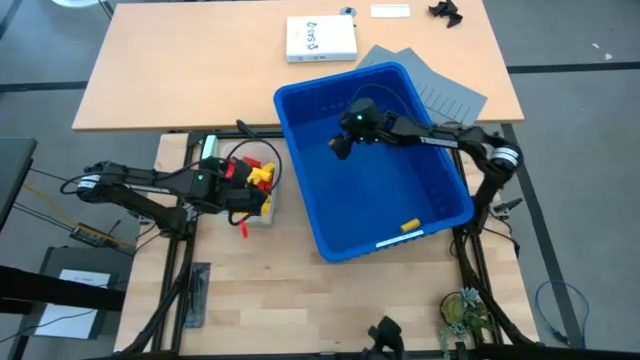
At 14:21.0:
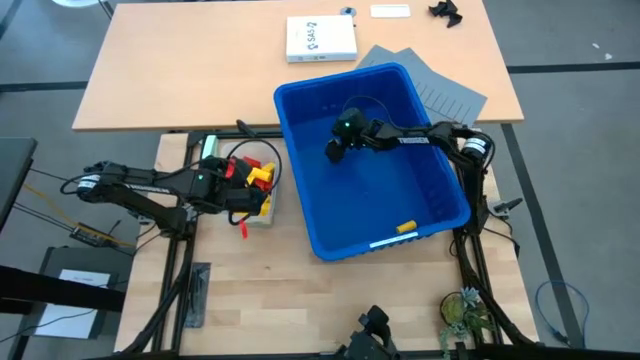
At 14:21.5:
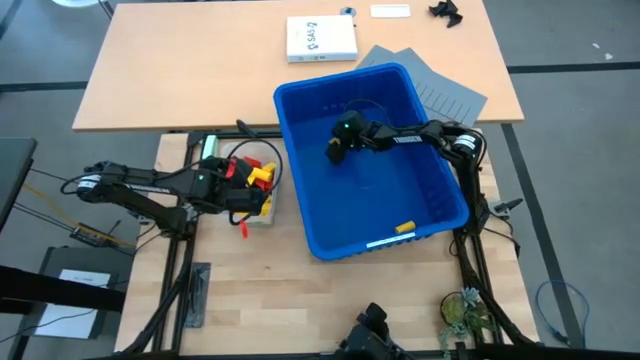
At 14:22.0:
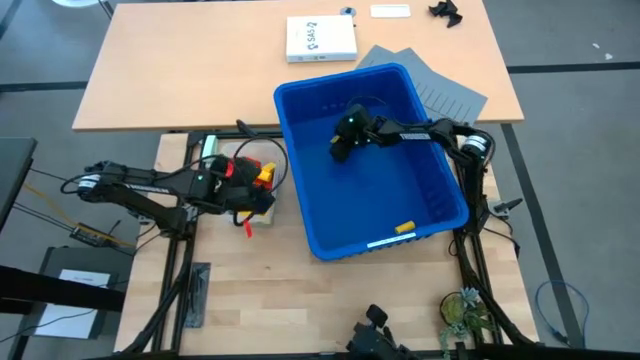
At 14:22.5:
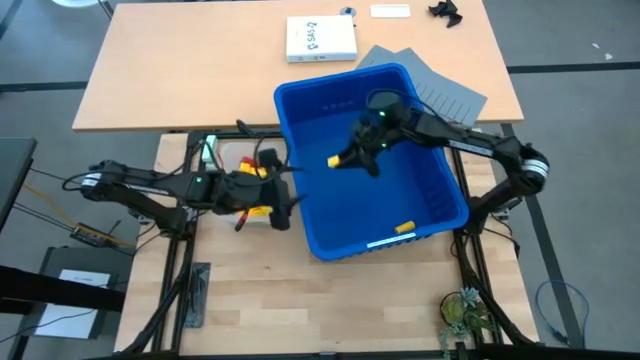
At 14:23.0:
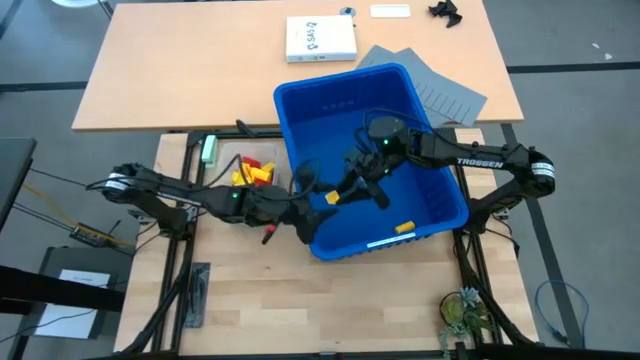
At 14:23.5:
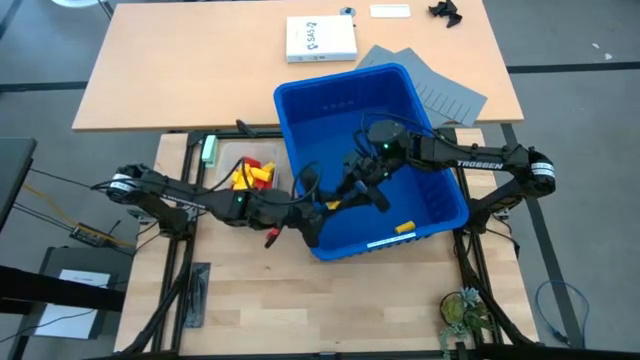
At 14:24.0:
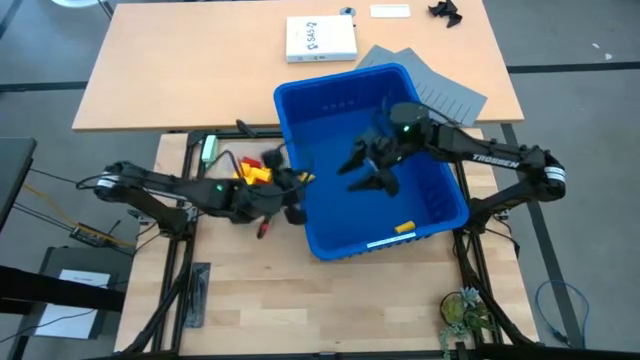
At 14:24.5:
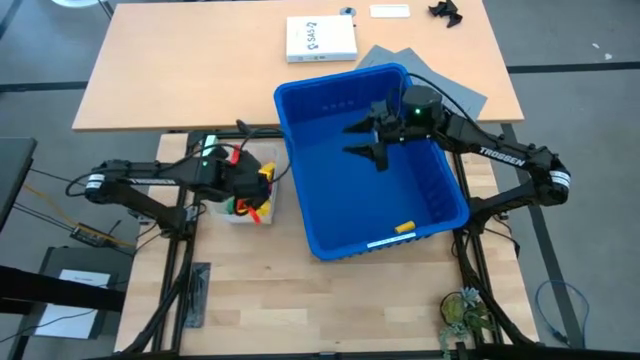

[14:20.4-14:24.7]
Task: Sort blocks
Put the yellow block into the transparent bin

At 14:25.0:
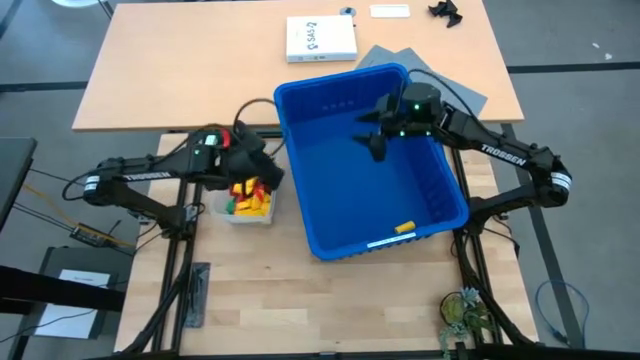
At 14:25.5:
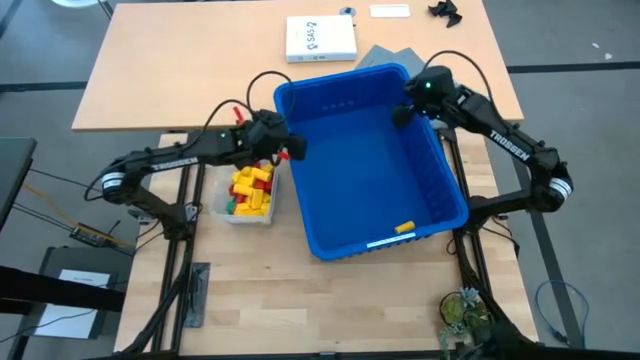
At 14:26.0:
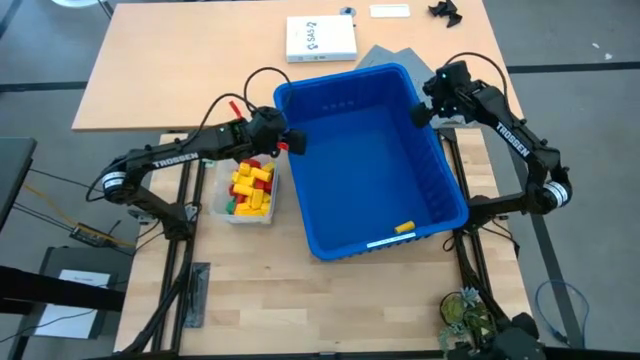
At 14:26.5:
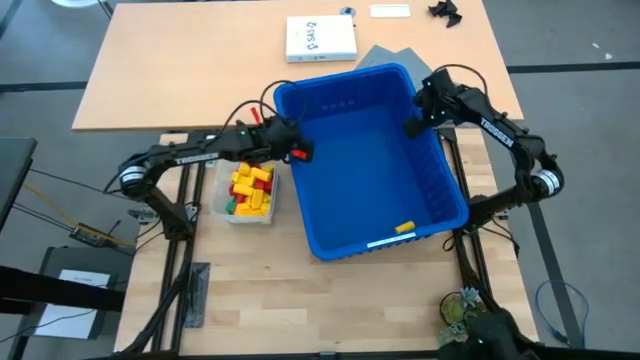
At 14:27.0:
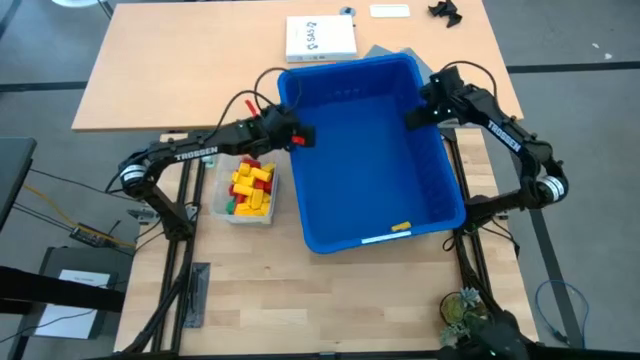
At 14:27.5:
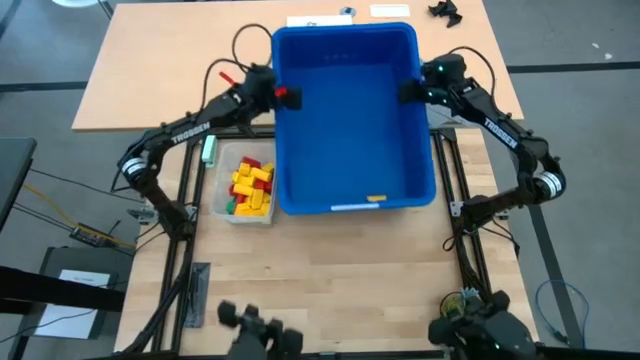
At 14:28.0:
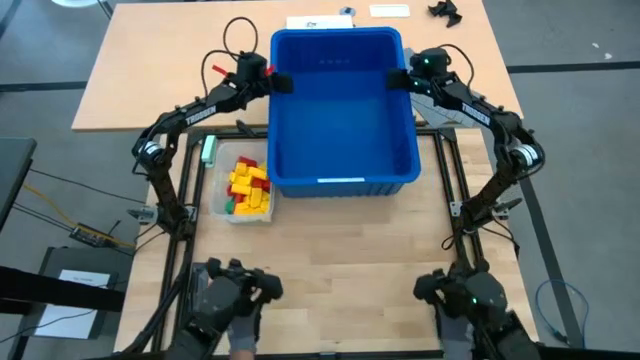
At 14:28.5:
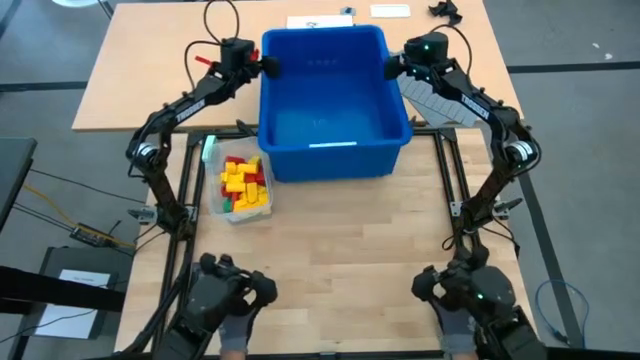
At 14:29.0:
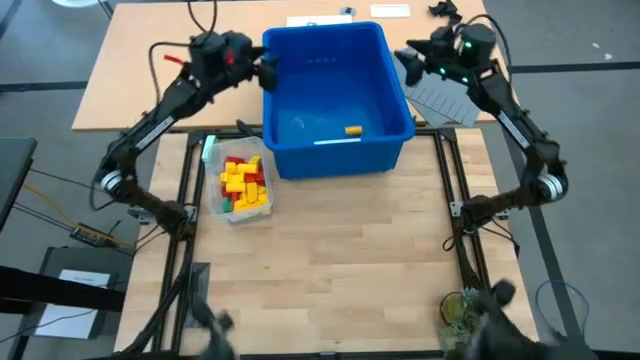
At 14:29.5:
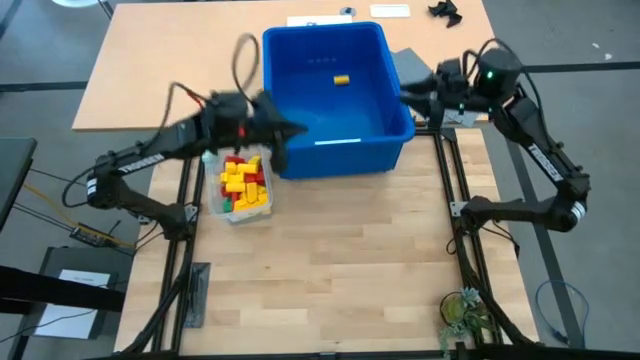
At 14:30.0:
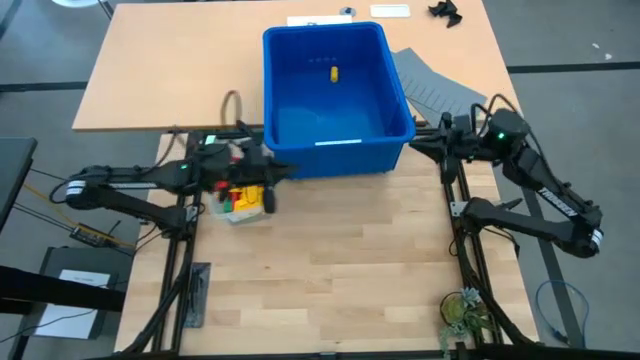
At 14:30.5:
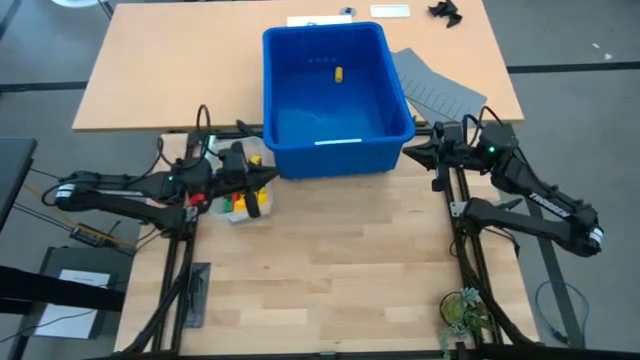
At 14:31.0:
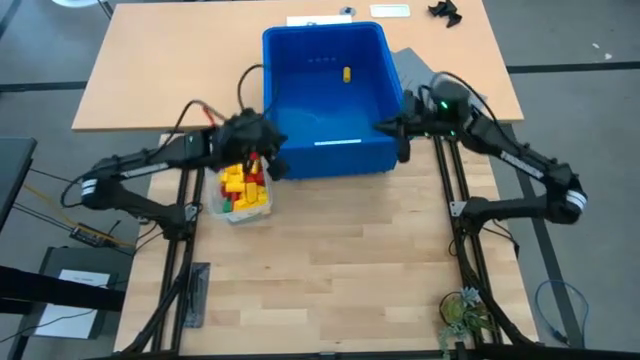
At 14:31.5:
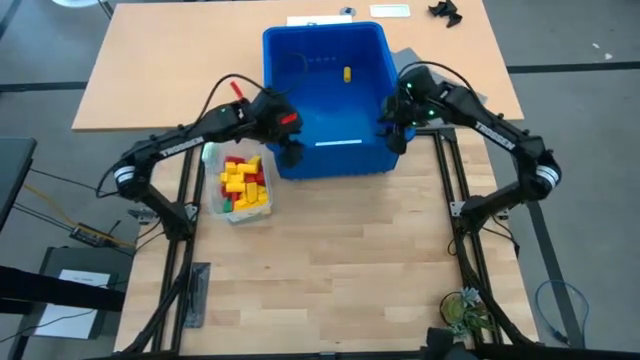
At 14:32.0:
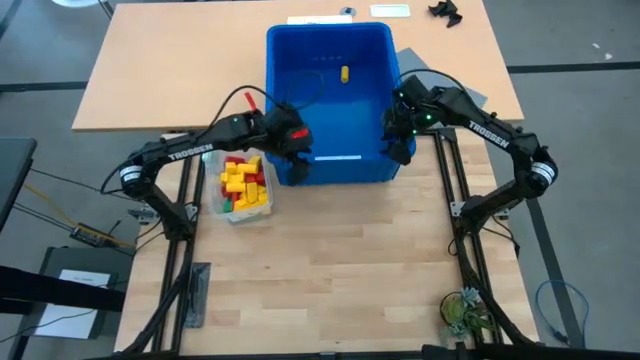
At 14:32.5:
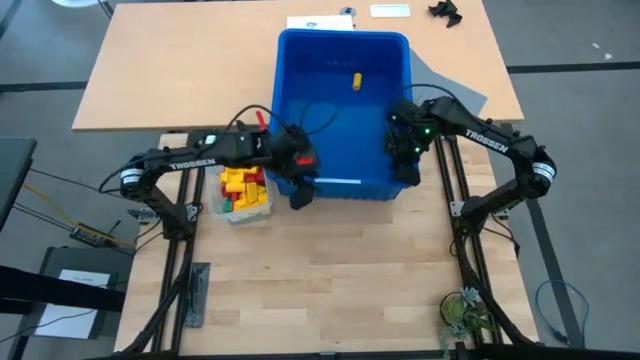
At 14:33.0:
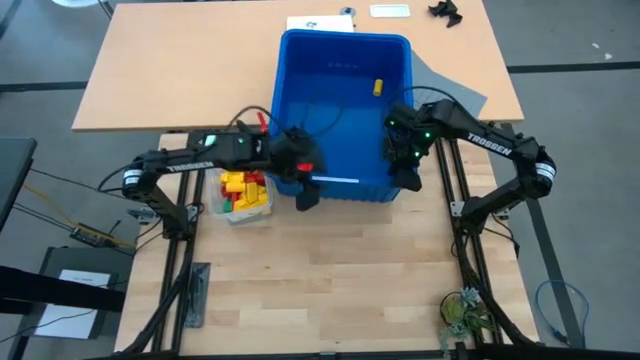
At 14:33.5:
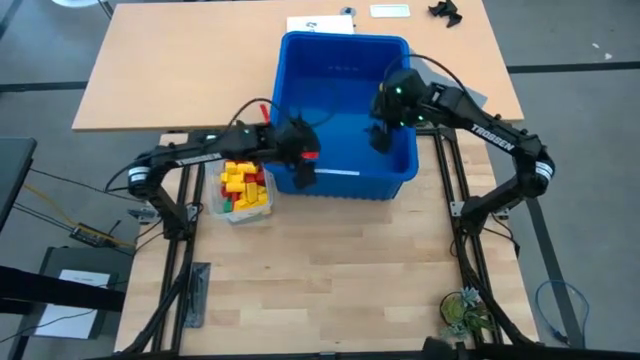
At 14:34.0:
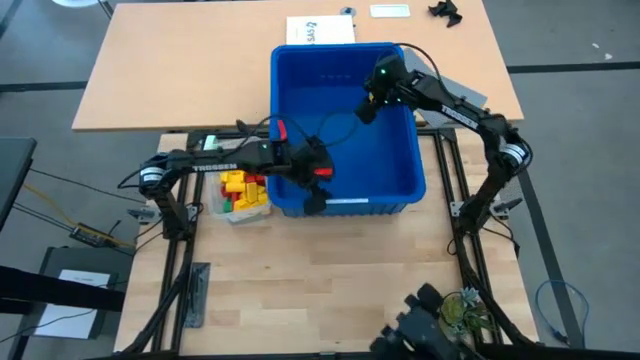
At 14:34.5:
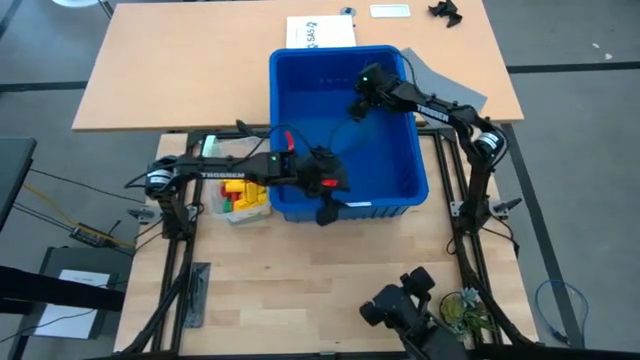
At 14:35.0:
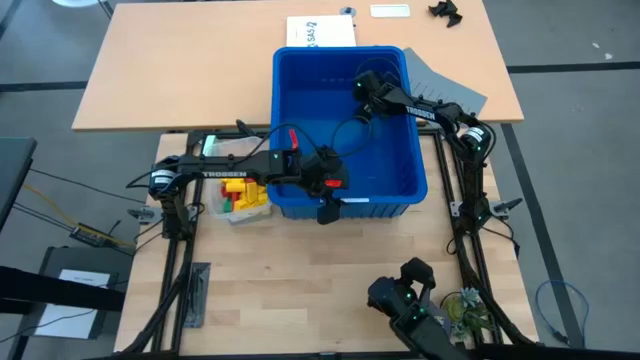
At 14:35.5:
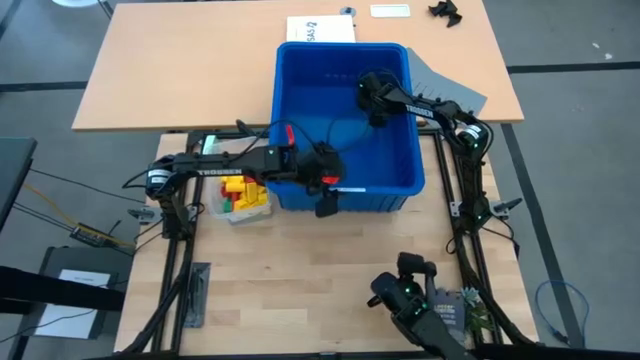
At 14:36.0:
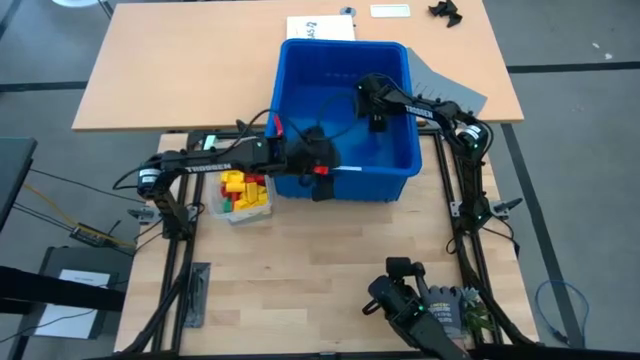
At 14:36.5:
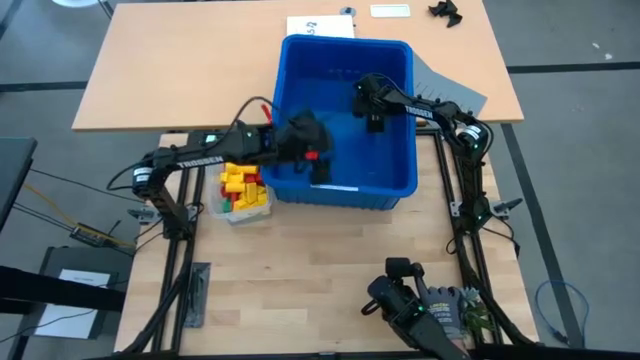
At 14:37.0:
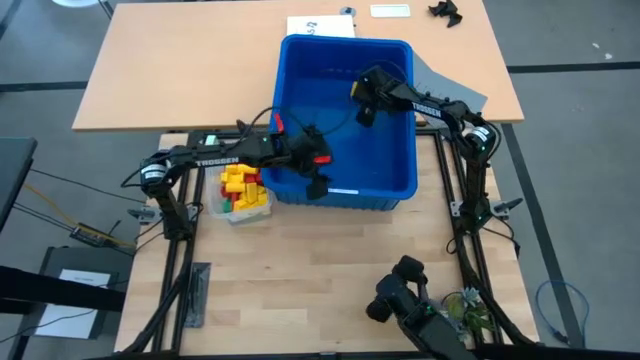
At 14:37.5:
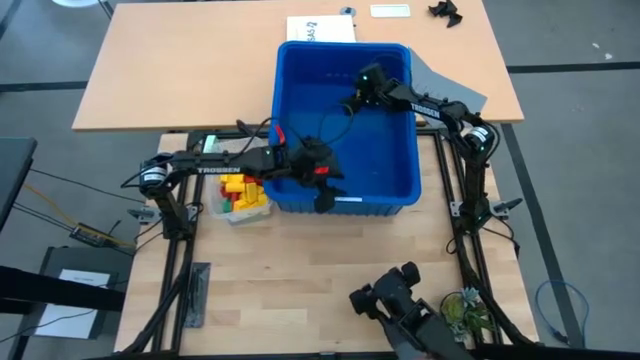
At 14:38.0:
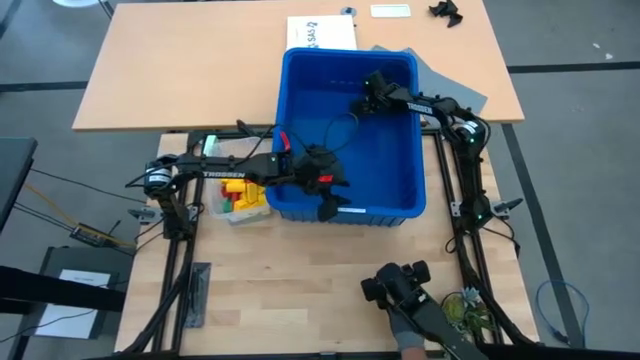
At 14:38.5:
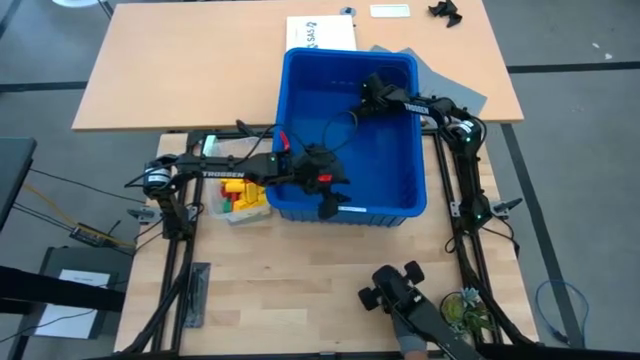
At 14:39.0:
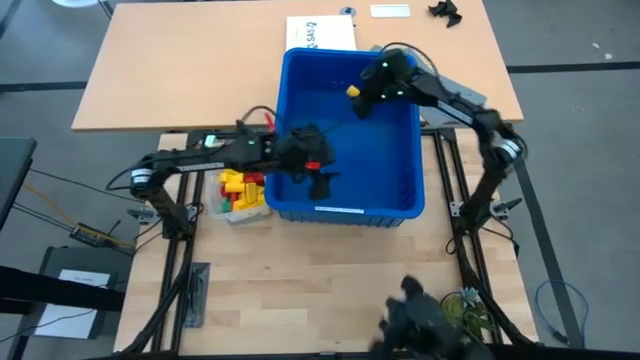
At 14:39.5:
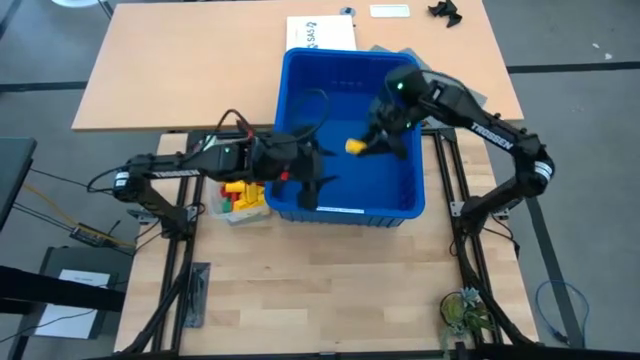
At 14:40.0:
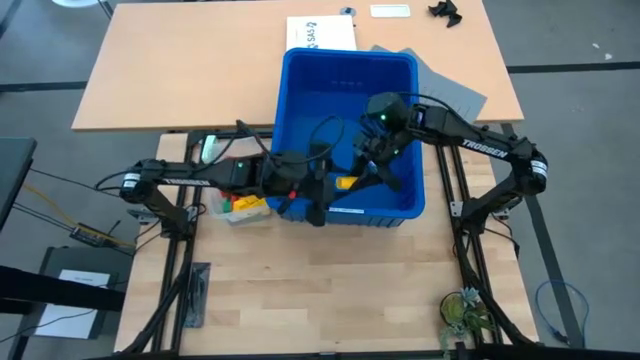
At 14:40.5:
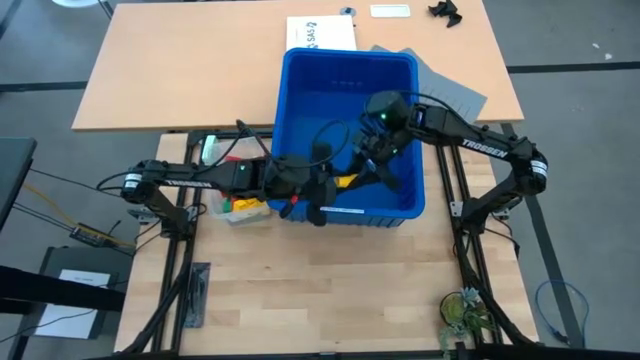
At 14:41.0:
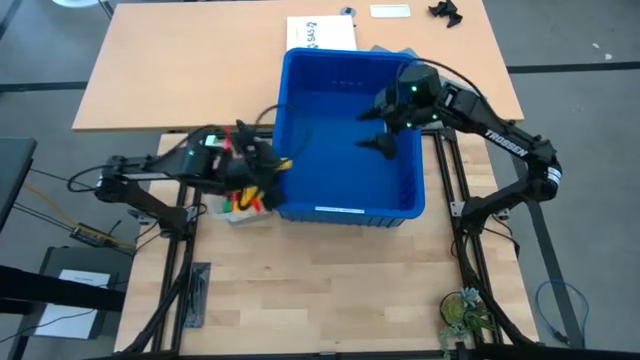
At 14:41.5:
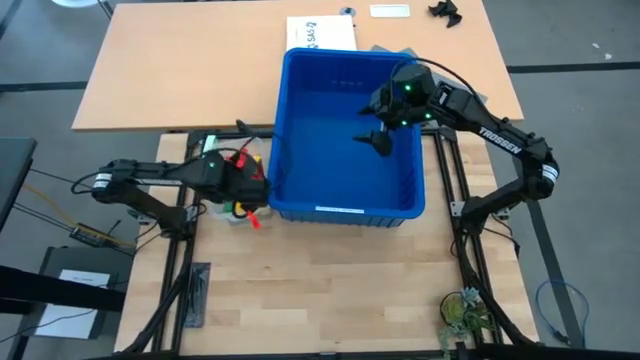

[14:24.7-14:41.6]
Put the yellow block into the transparent bin
